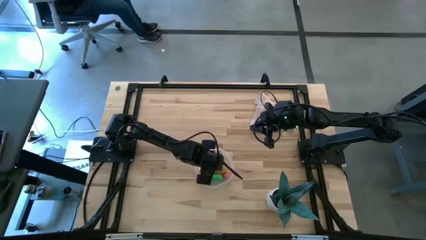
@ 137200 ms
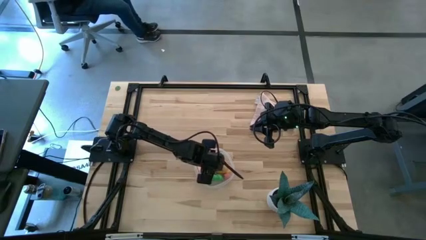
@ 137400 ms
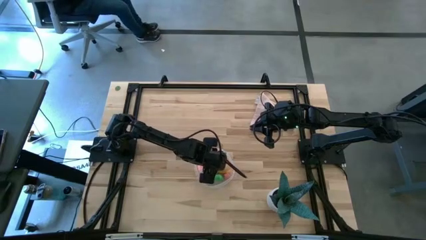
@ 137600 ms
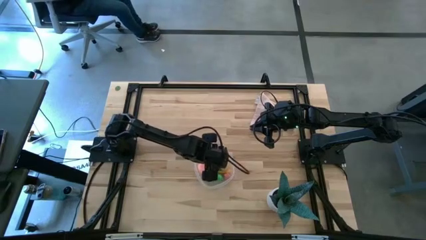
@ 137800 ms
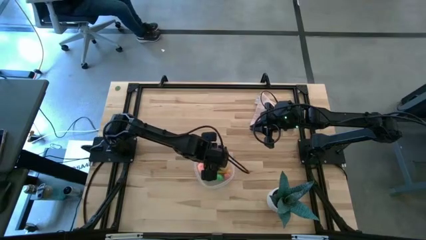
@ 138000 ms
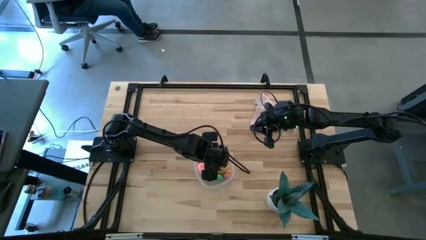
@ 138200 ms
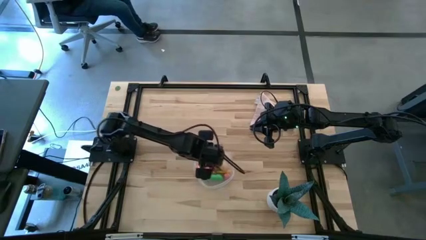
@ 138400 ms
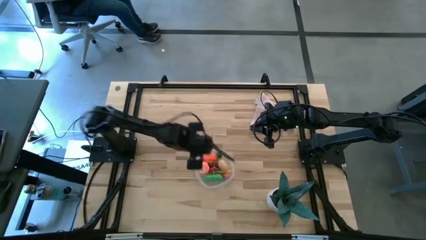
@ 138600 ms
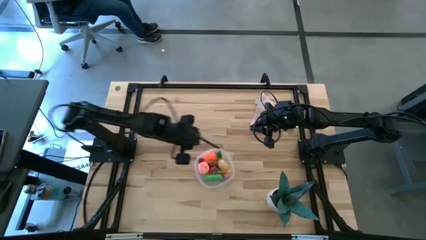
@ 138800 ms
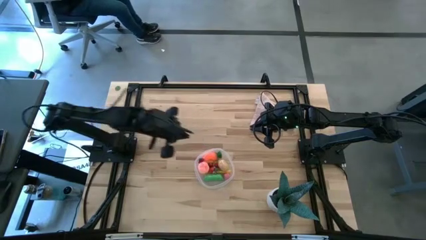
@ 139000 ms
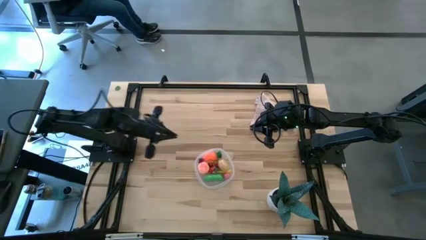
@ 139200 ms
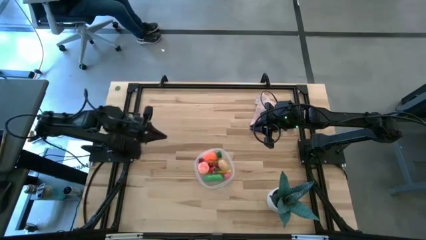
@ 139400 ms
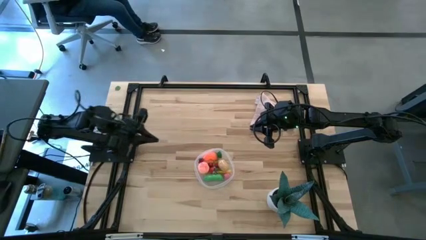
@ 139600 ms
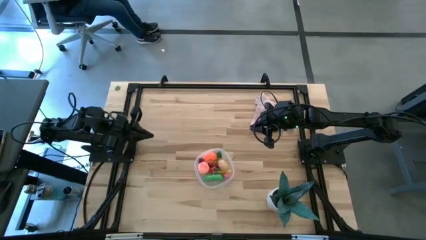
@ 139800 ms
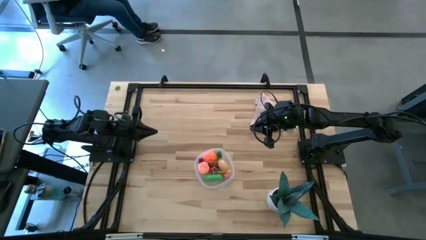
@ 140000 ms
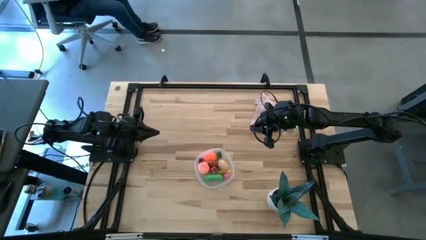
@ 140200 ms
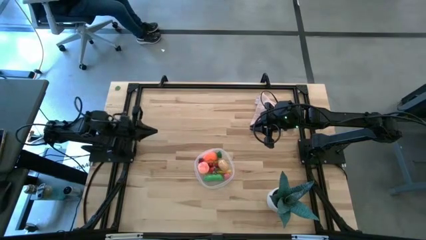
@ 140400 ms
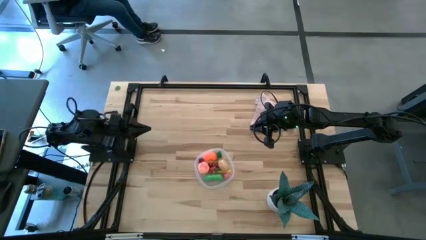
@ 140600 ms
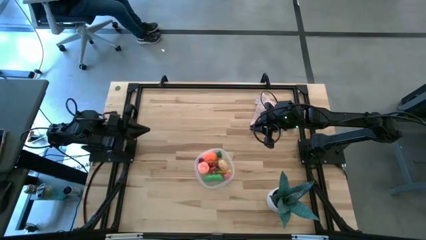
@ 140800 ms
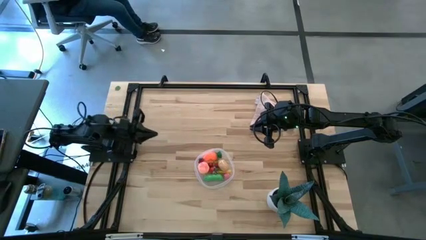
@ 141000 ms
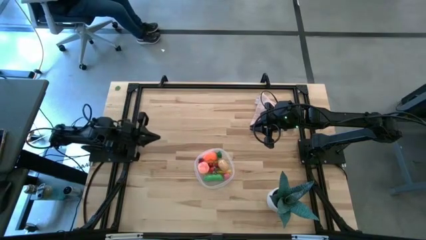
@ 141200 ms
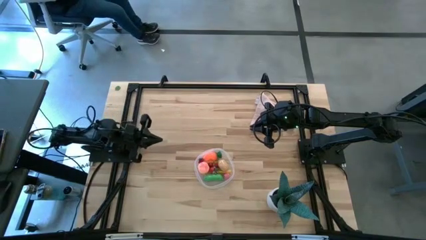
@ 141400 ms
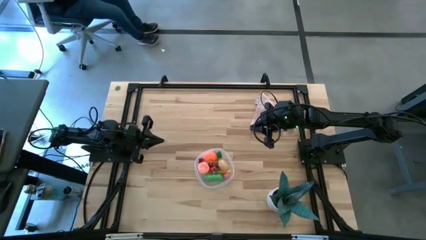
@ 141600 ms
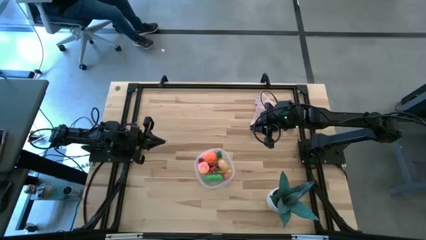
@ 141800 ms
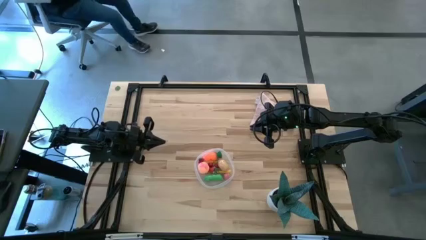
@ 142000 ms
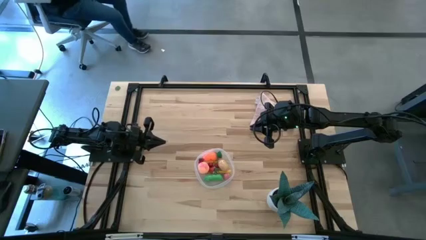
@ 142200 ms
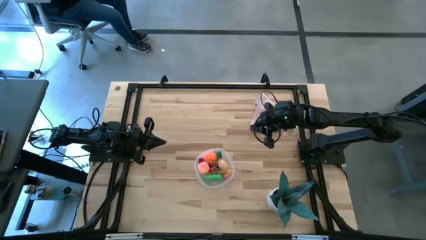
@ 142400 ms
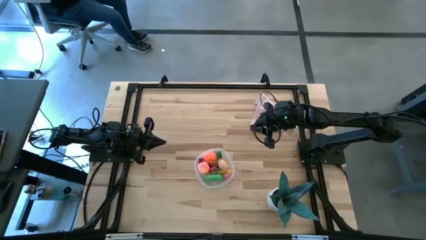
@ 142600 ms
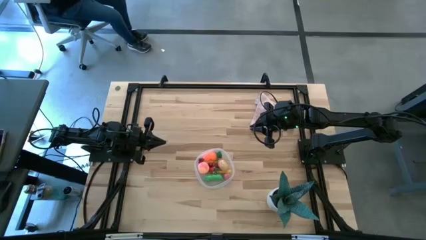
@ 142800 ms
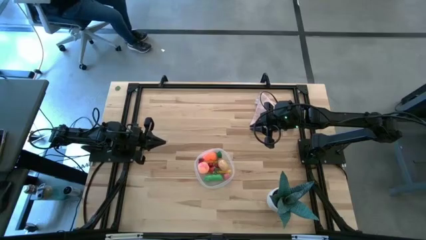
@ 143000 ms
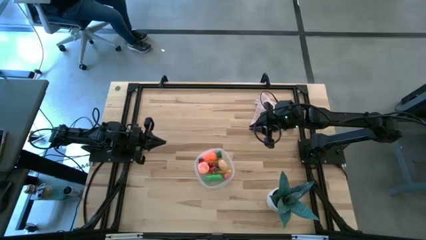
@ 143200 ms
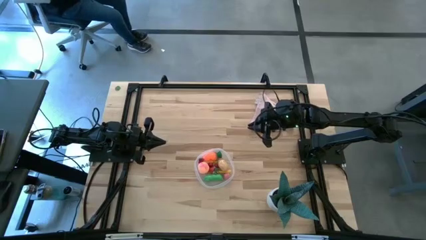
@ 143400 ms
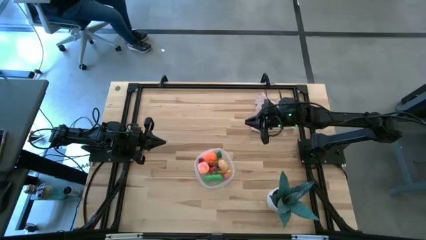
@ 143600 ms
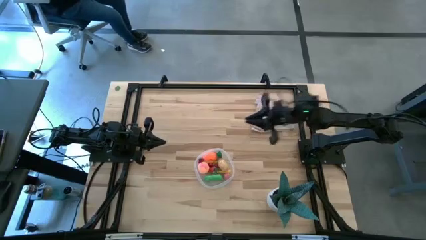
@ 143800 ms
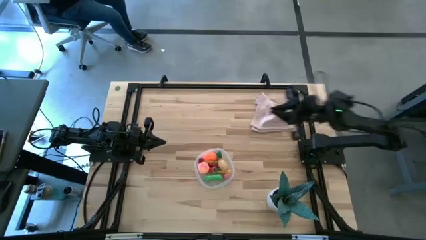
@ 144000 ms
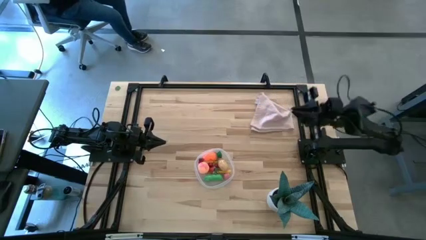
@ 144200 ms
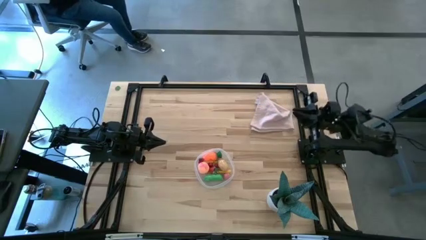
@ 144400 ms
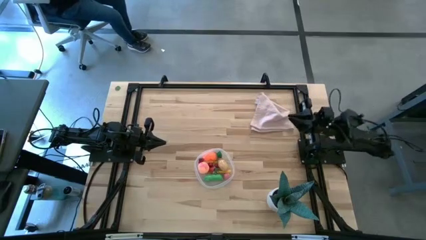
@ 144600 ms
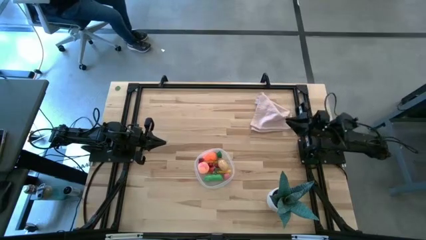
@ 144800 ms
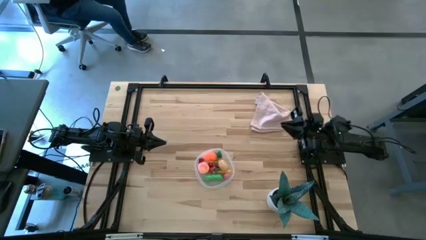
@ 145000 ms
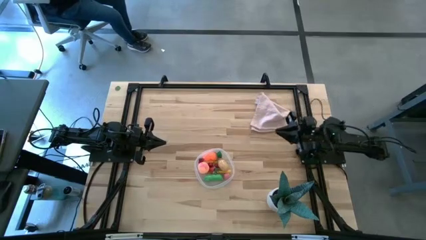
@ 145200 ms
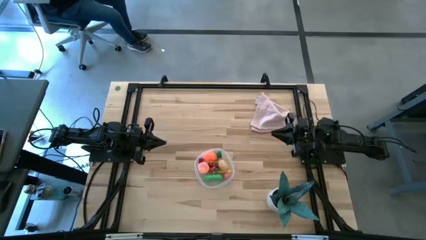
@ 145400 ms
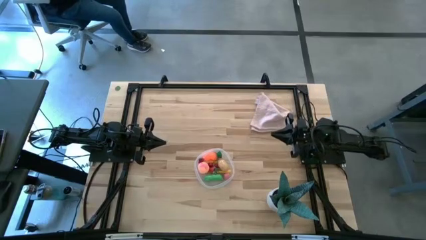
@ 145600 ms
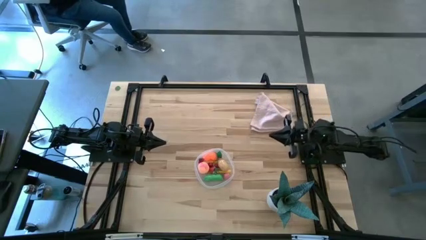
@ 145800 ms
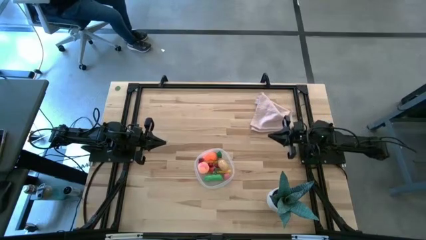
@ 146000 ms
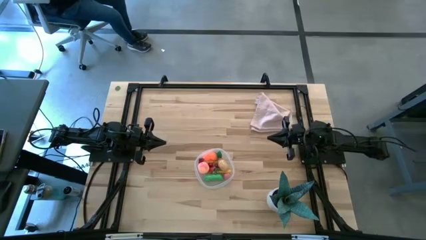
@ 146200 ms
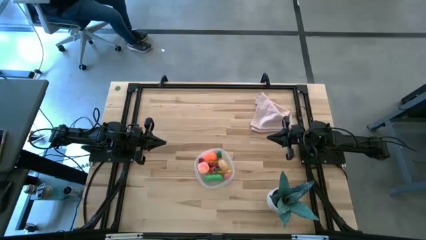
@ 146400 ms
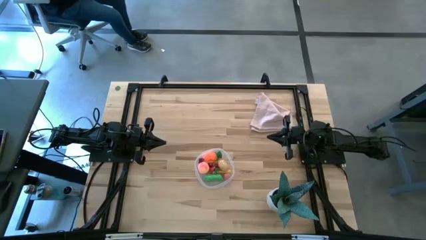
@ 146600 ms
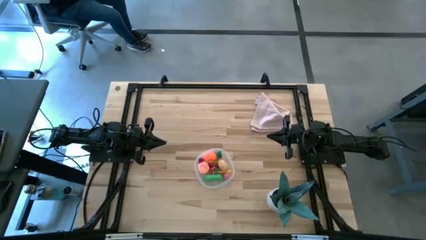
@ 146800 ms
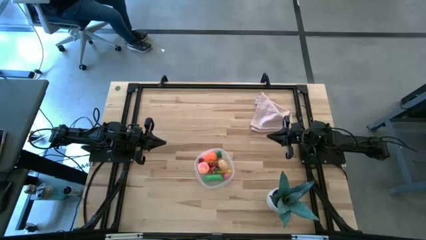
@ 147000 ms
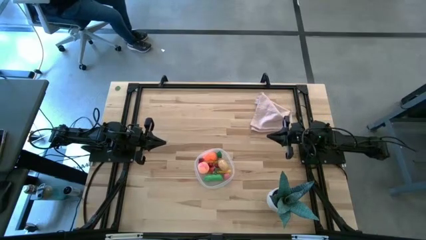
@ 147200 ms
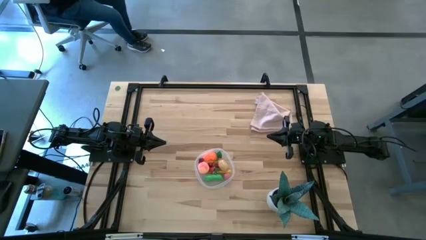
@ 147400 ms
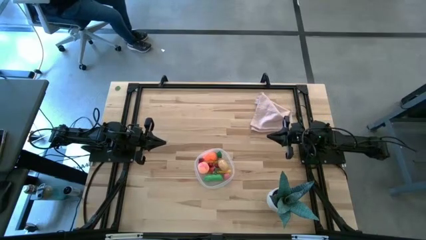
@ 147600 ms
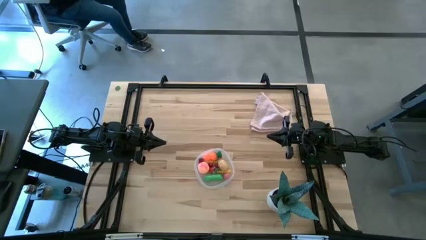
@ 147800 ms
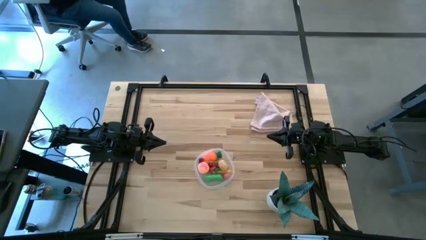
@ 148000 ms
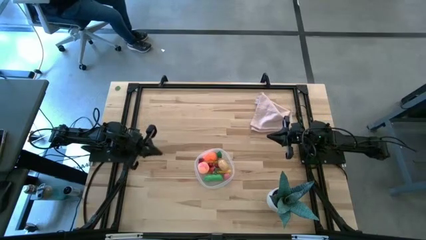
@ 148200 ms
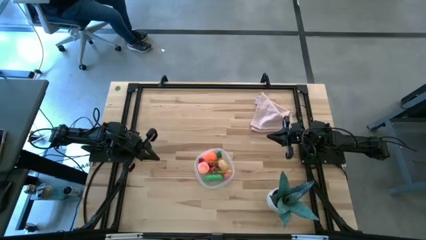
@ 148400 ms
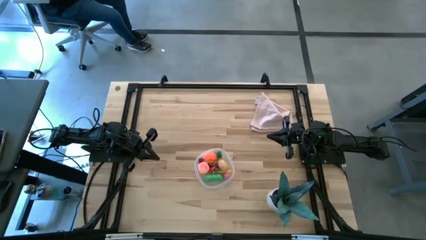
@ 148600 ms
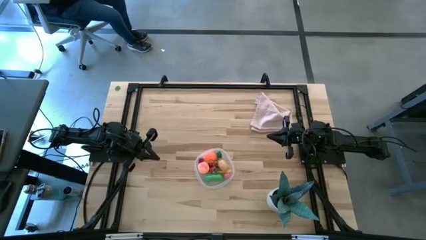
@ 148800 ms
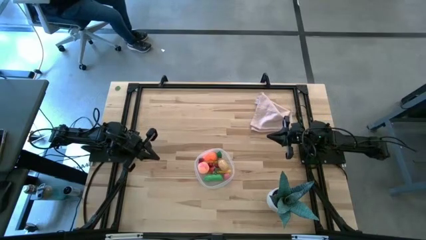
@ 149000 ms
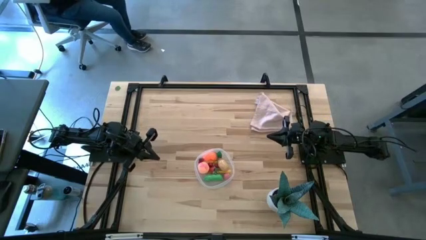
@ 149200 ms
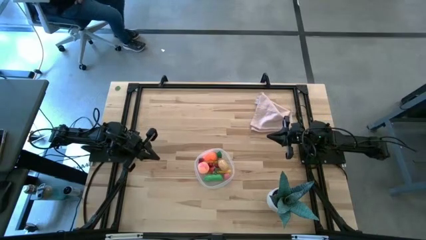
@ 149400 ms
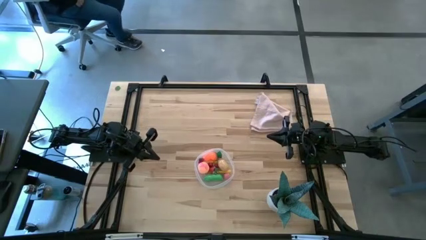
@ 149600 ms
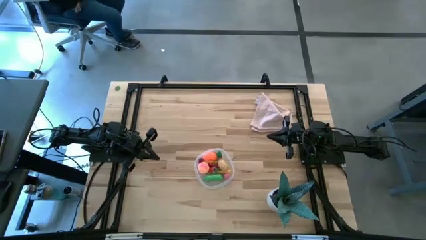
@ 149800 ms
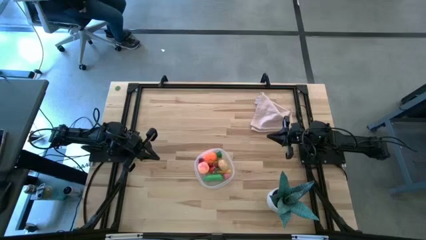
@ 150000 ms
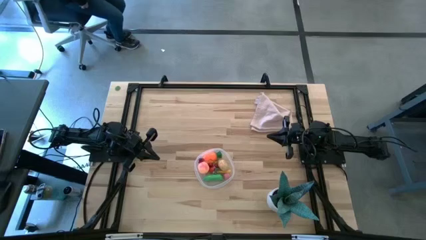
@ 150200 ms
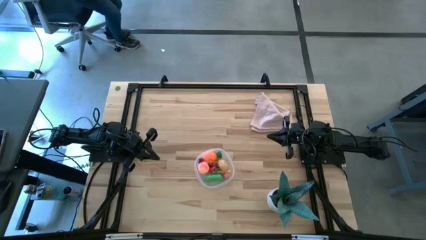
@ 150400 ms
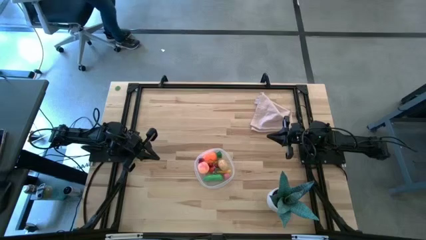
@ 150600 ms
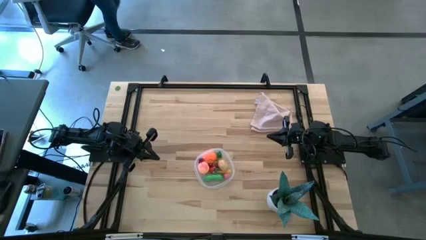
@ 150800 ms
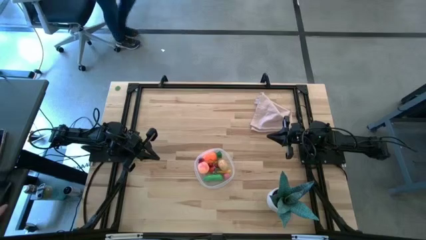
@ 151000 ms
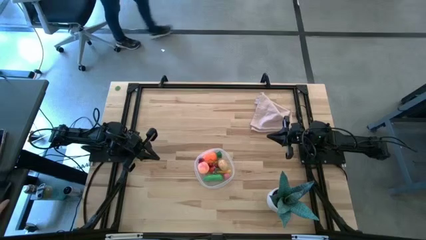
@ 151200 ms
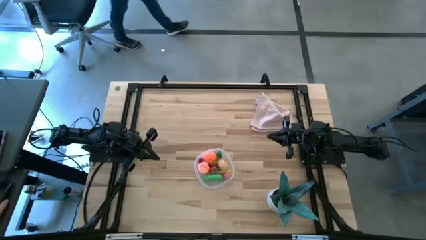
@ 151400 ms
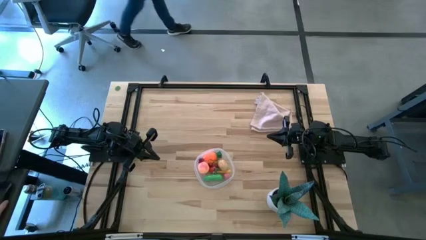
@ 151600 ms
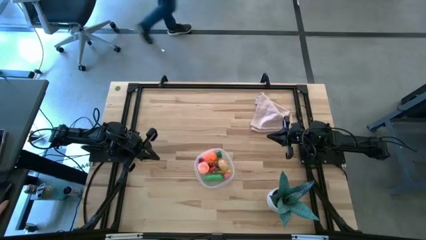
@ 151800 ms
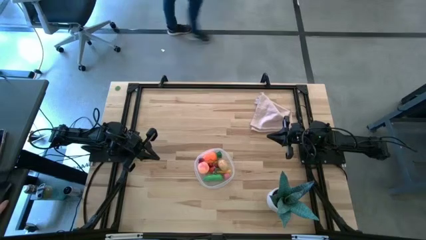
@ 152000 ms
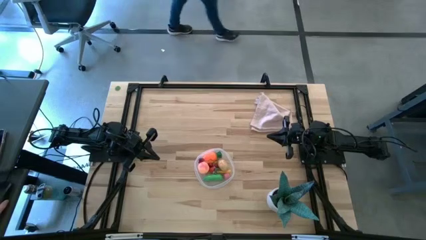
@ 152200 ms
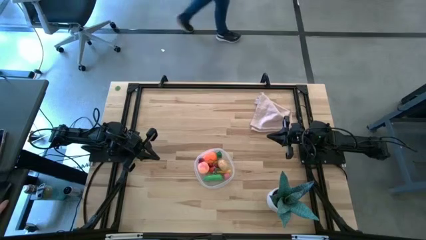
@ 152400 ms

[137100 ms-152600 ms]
Task: Pick and placing Produce into tupperware
Return to Home Position
